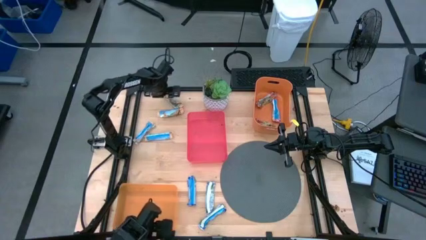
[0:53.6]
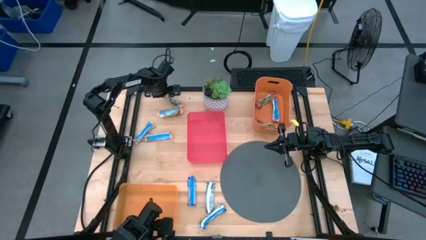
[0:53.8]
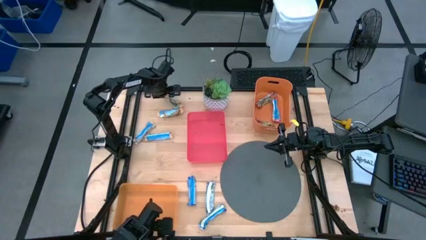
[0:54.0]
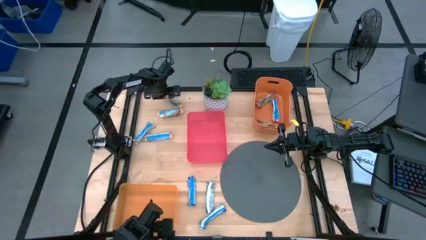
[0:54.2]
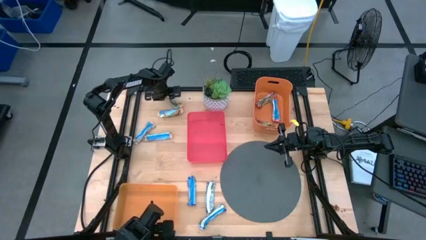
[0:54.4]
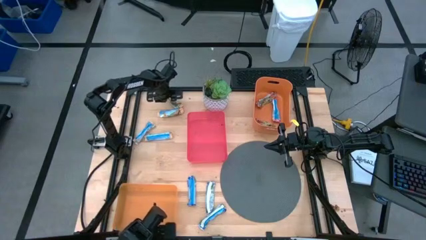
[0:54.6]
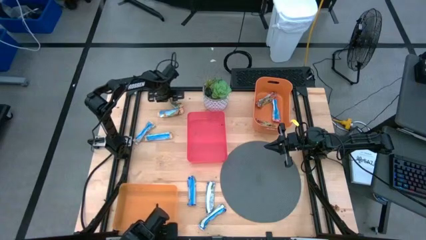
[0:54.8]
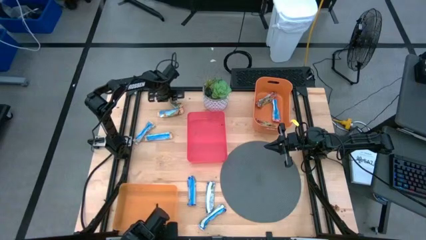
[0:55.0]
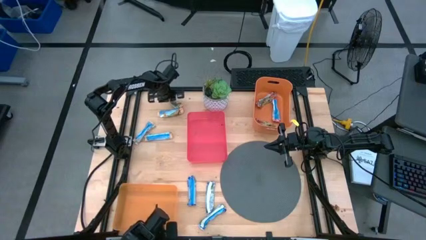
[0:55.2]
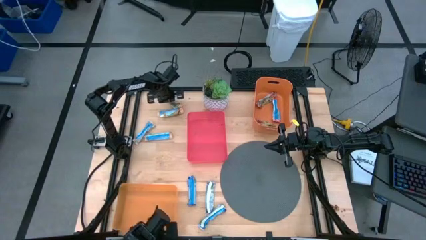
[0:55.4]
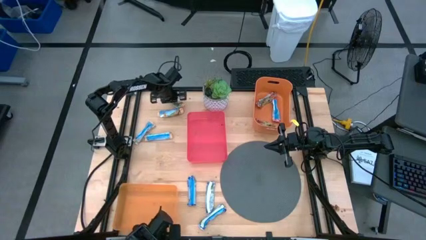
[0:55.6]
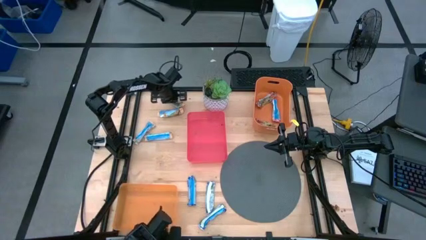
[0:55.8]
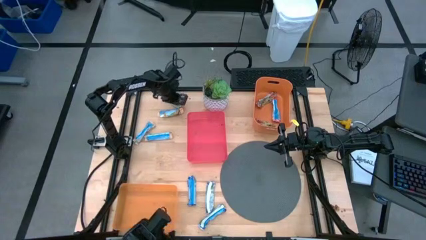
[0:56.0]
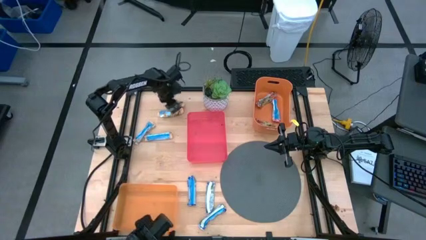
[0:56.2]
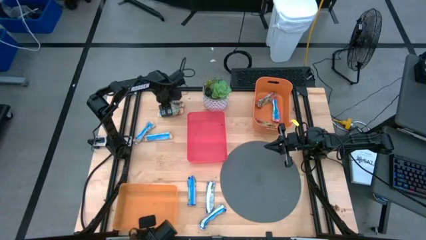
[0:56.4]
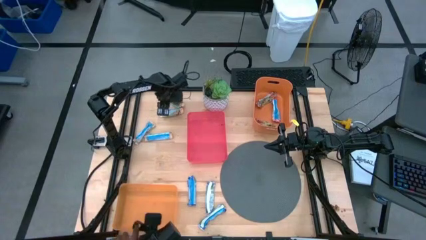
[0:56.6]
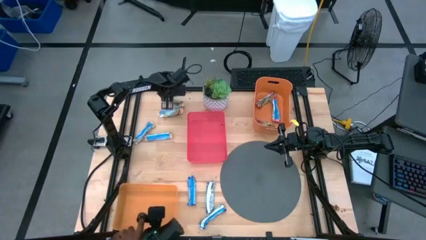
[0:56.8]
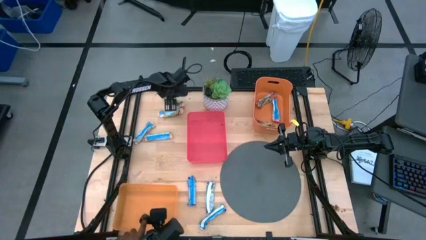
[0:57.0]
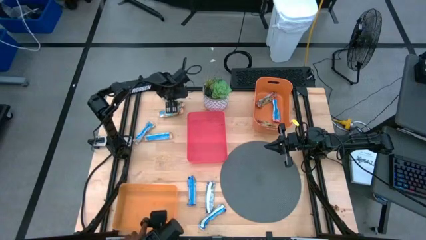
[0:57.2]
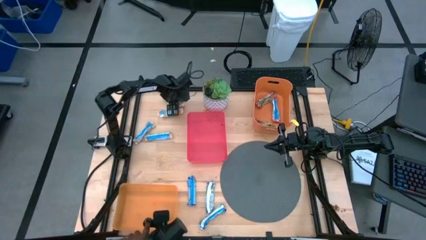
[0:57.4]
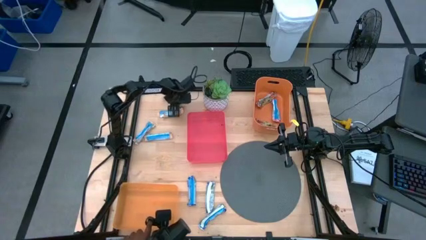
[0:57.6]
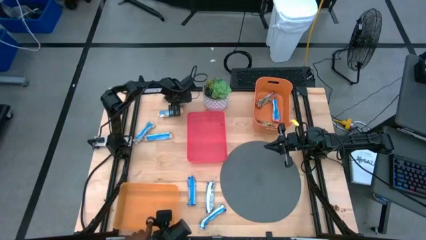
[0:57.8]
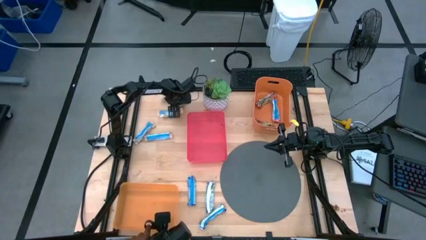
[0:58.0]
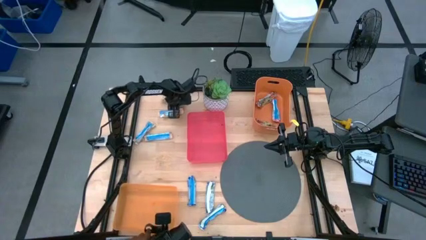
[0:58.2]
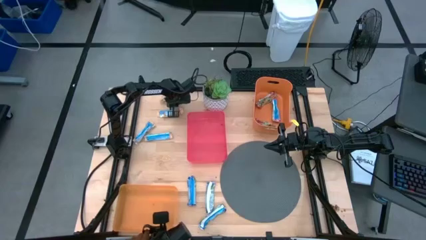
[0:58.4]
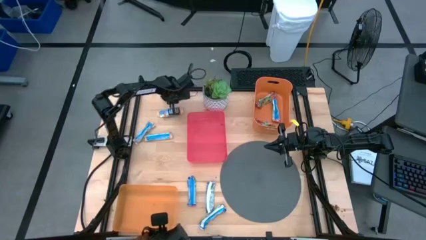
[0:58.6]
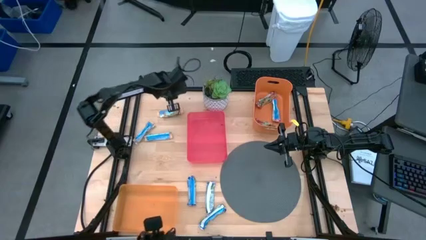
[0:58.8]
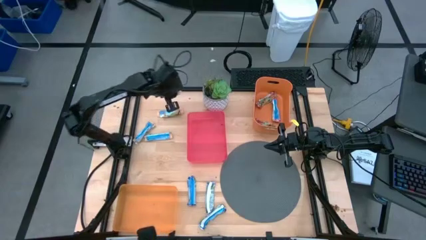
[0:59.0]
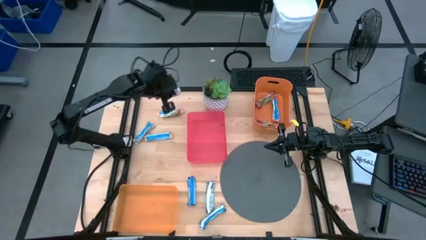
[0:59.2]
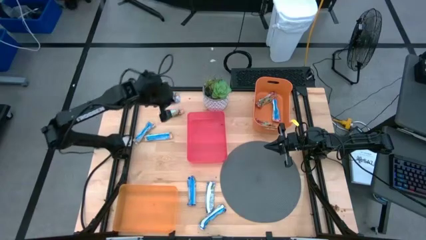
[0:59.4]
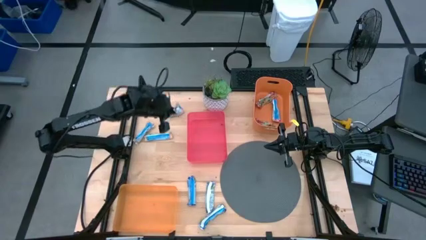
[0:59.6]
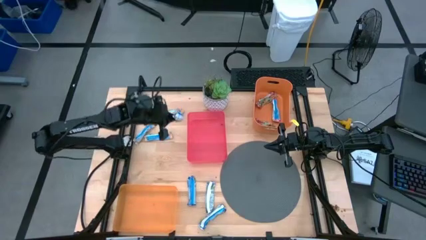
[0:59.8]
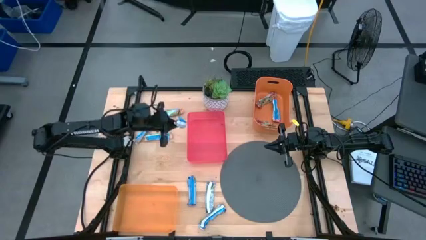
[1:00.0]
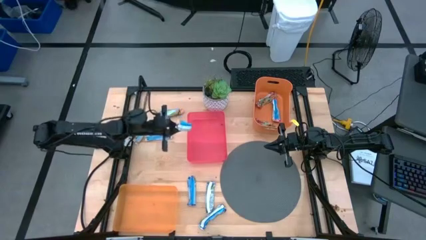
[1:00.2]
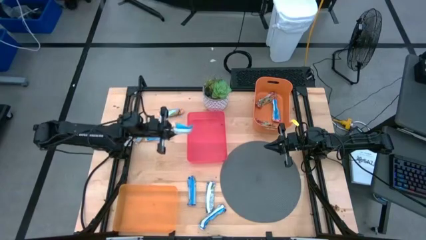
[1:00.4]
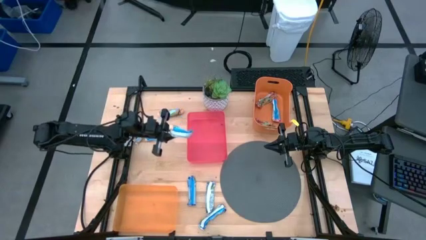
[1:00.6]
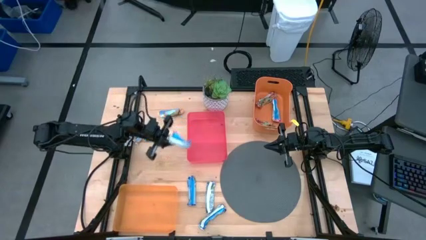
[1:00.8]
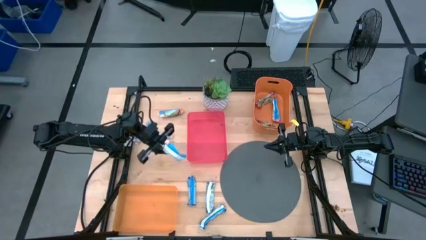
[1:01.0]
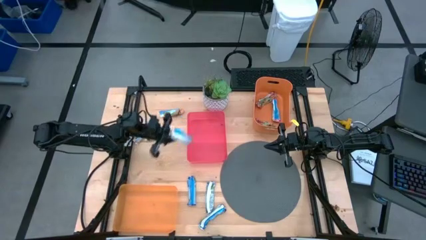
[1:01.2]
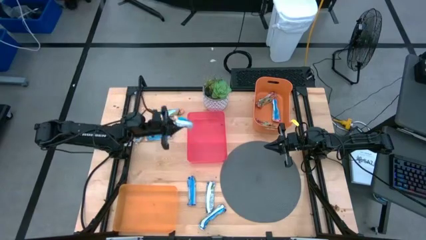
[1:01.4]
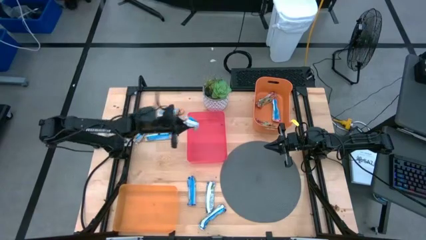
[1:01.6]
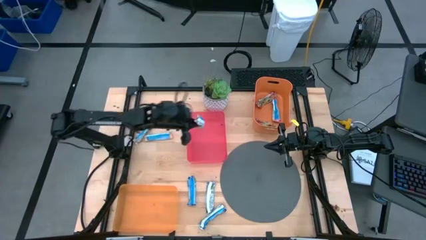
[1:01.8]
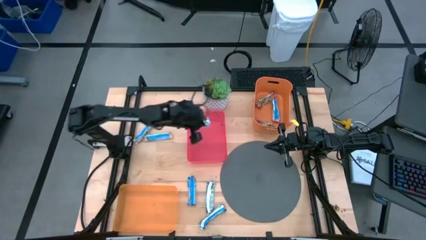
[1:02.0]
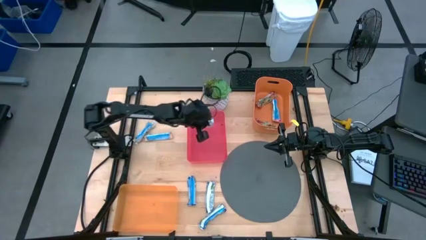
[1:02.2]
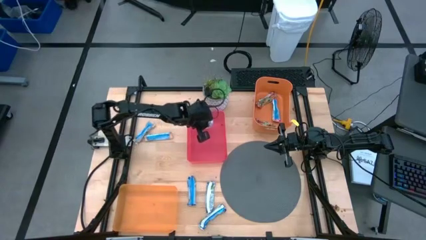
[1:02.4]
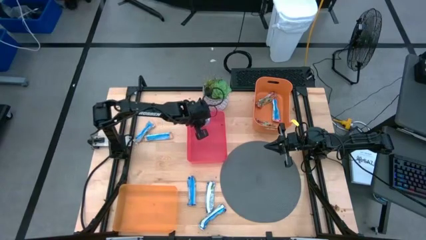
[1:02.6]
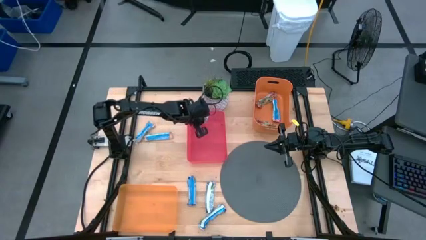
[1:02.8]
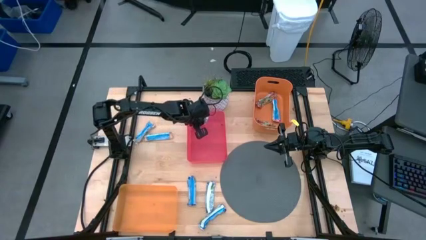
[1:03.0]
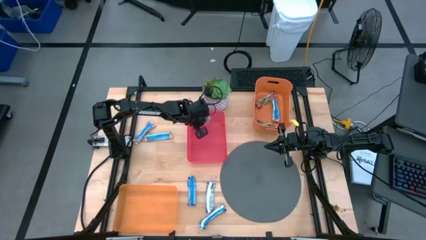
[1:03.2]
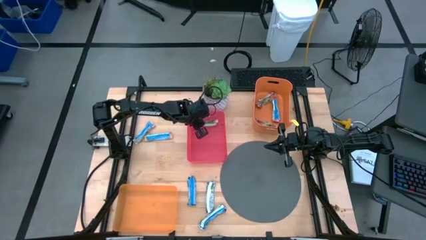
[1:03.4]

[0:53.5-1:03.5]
Task: Pick and place Granola Bars by type
Put the blue/orange granola bar into the pink bin

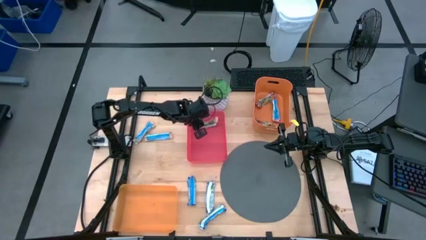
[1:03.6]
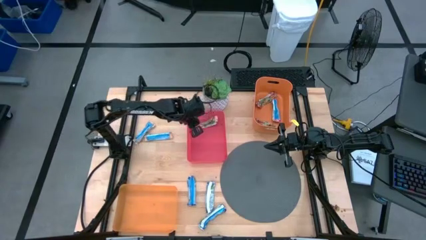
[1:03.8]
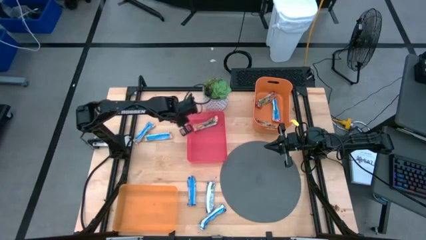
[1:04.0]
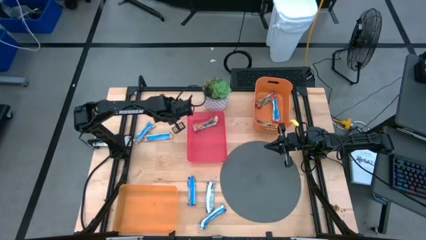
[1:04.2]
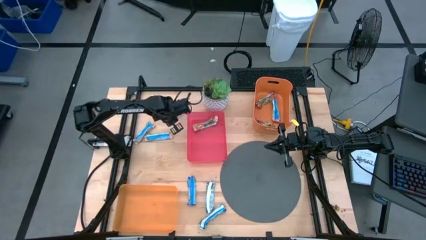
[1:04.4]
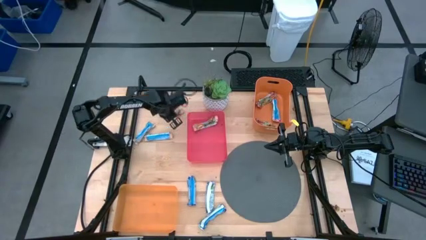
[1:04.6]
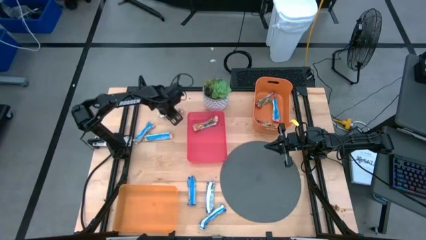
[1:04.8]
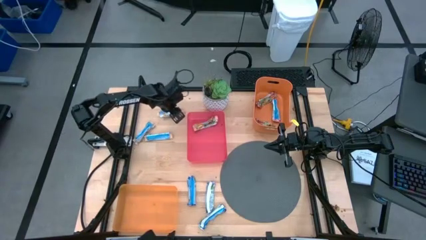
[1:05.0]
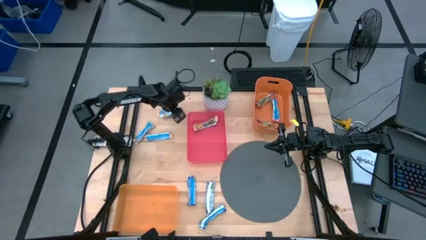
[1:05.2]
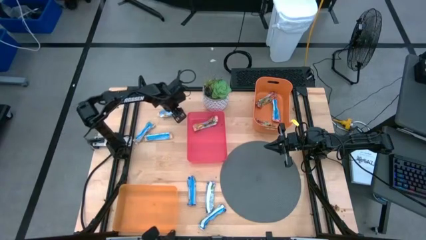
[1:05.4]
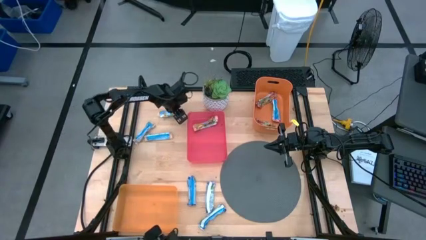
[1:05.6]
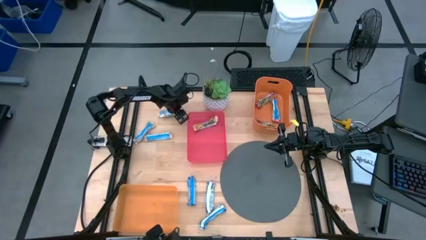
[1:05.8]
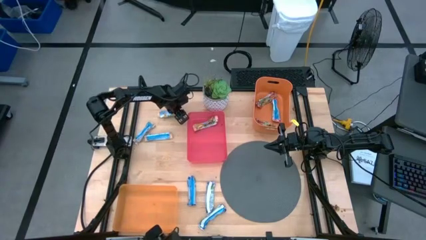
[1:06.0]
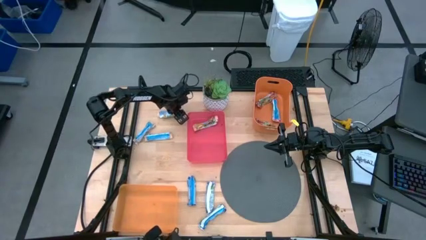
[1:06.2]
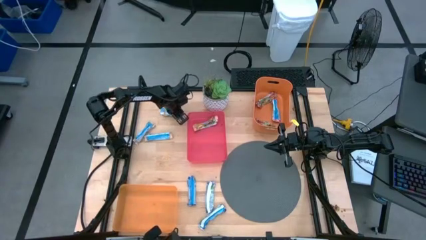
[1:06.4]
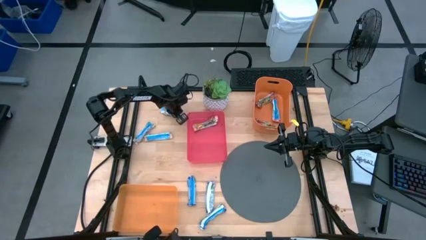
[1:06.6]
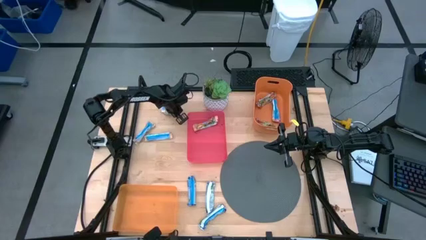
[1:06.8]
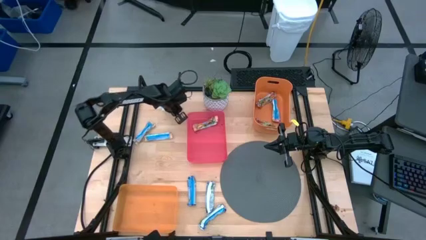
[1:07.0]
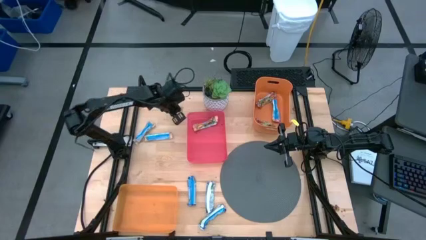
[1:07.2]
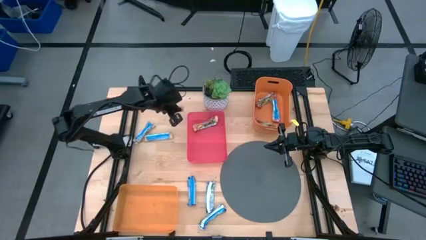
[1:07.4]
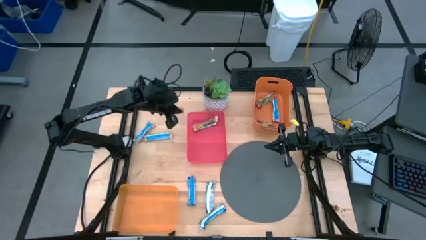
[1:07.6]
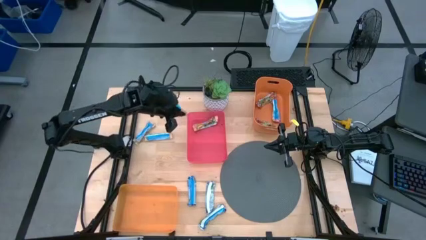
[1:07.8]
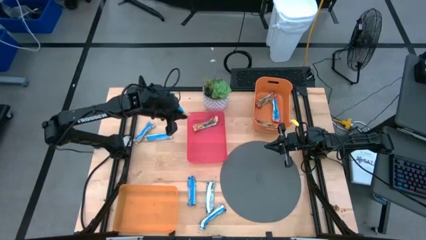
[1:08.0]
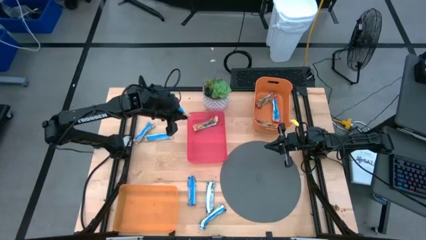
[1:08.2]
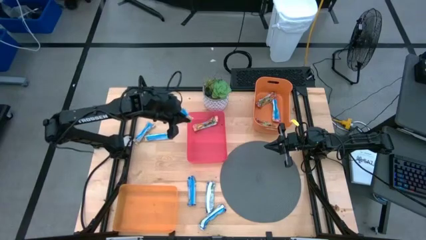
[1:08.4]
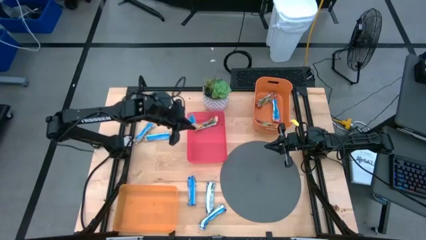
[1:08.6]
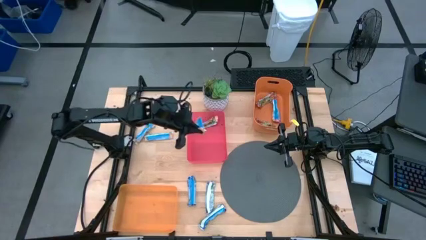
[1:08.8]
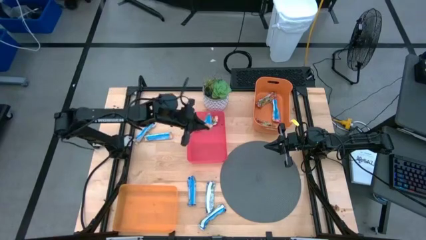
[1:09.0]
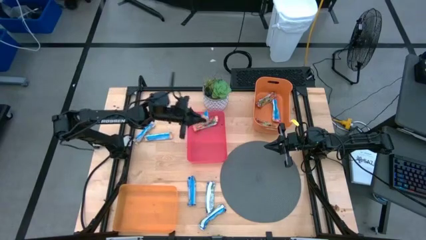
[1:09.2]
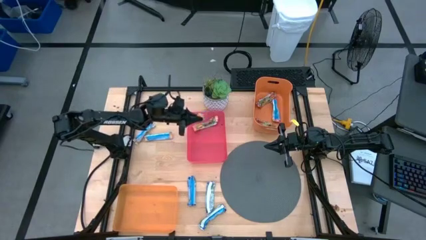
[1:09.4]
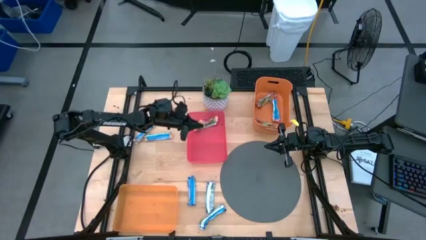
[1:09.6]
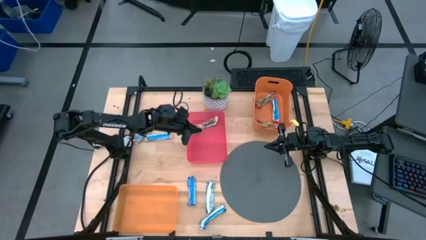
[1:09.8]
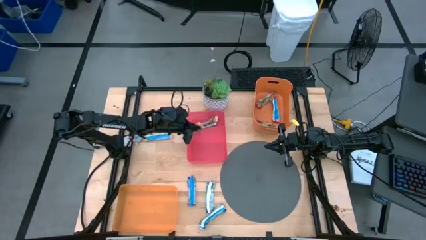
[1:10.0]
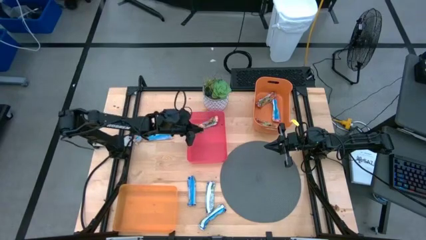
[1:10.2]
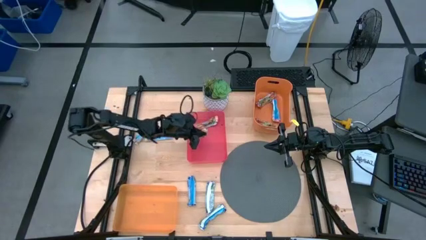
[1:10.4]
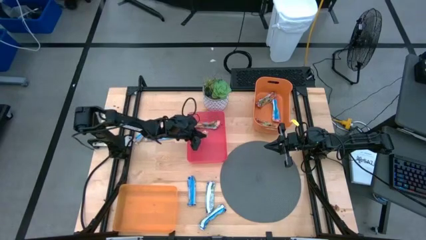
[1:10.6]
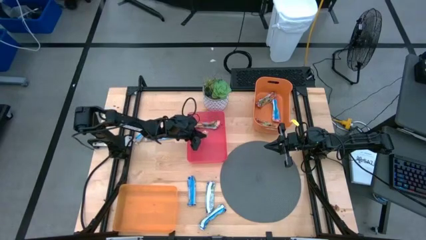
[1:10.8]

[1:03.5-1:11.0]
Put the blue/orange granola bar into the pink bin
